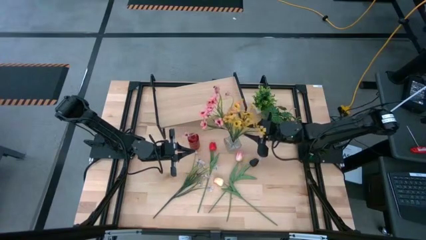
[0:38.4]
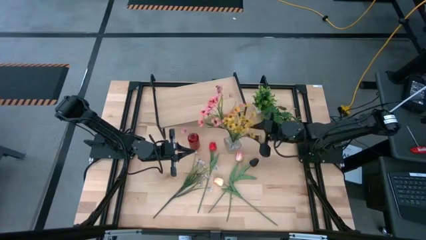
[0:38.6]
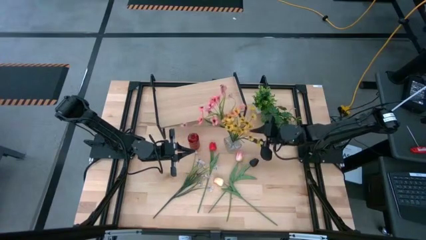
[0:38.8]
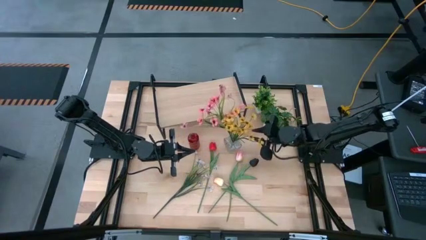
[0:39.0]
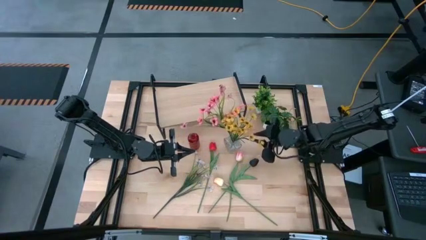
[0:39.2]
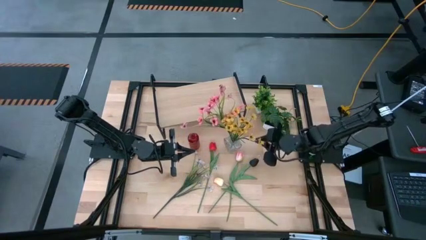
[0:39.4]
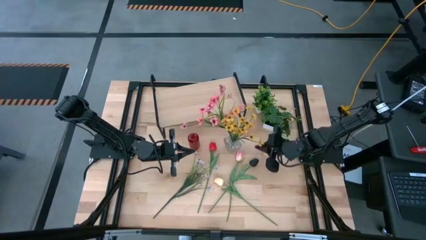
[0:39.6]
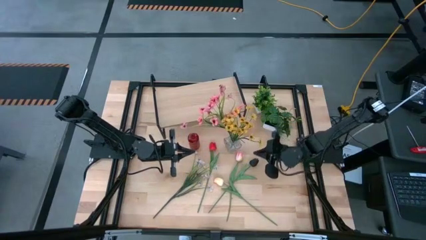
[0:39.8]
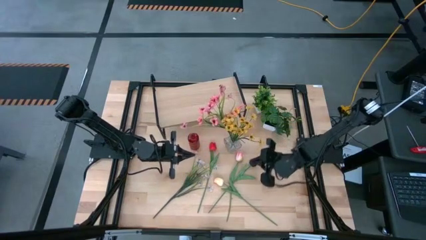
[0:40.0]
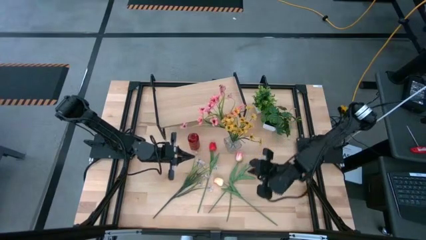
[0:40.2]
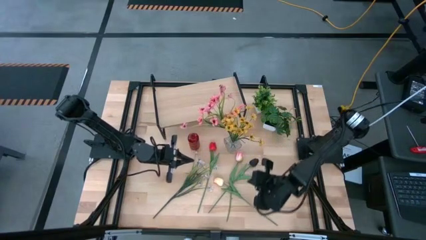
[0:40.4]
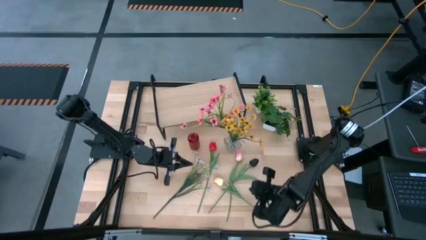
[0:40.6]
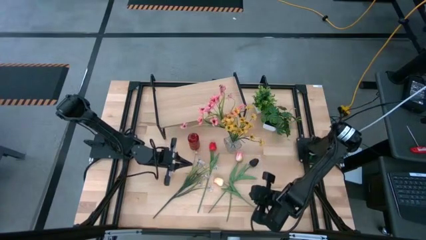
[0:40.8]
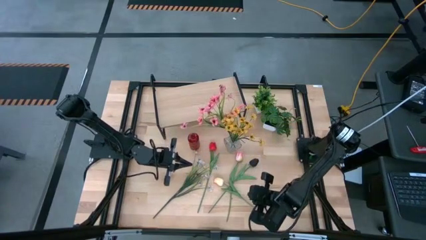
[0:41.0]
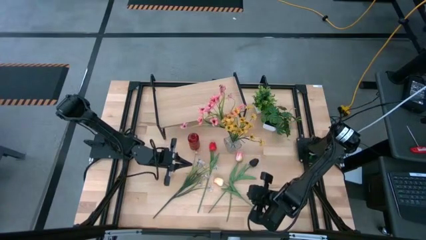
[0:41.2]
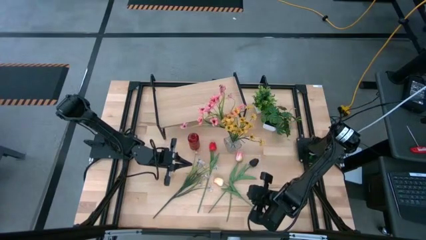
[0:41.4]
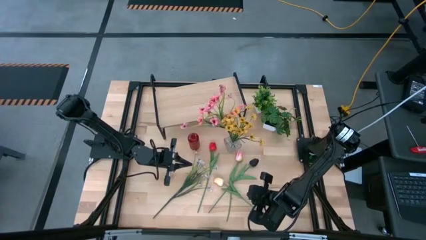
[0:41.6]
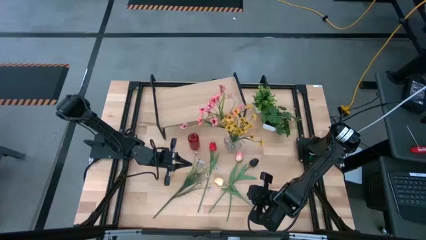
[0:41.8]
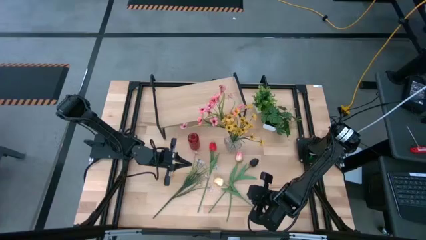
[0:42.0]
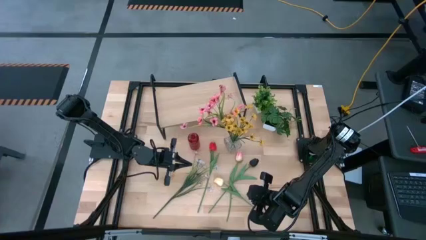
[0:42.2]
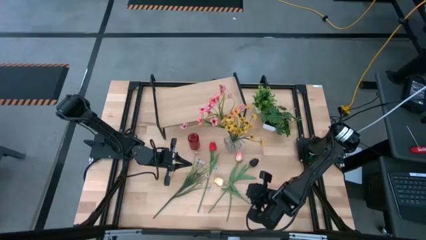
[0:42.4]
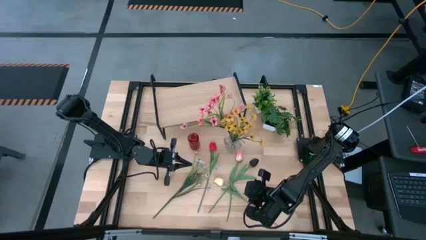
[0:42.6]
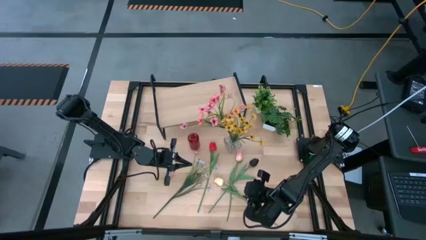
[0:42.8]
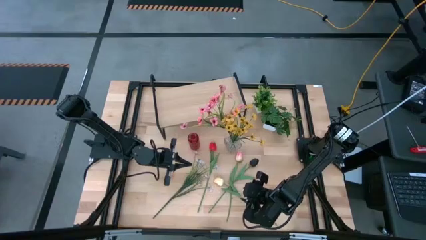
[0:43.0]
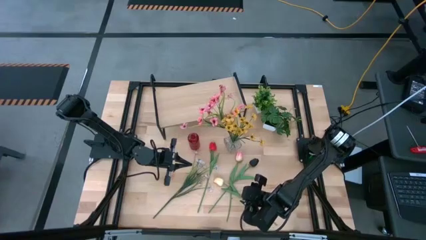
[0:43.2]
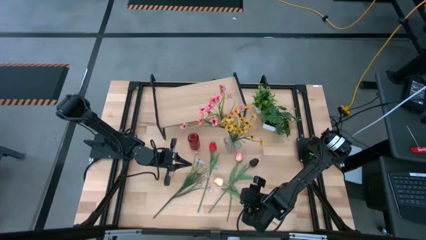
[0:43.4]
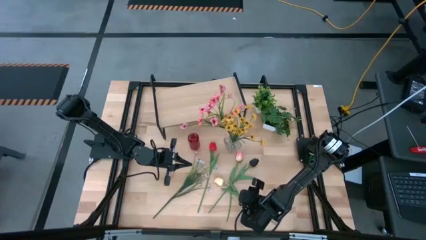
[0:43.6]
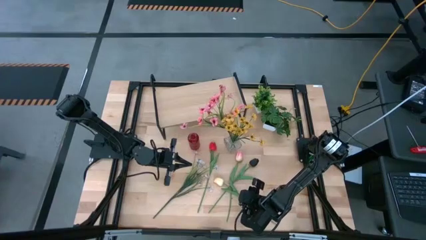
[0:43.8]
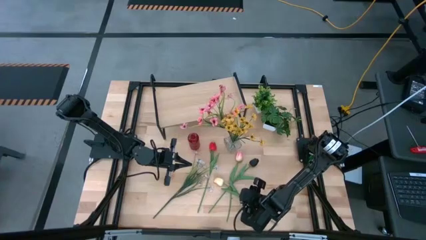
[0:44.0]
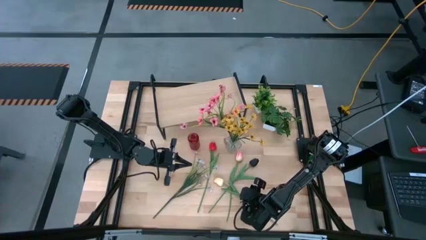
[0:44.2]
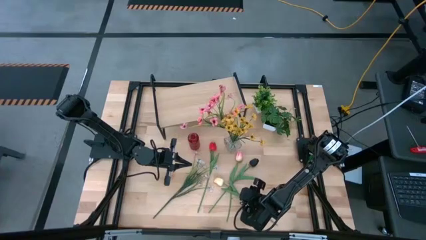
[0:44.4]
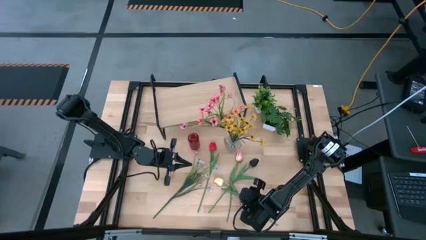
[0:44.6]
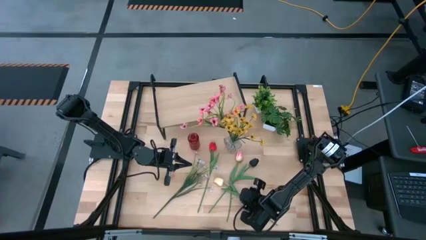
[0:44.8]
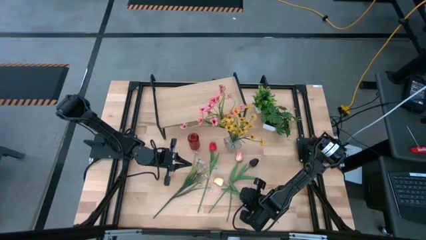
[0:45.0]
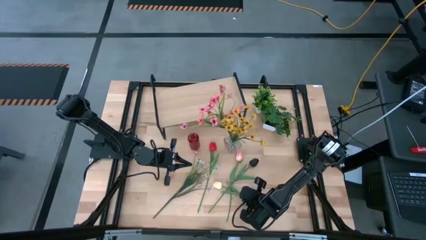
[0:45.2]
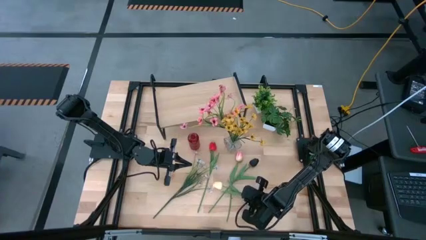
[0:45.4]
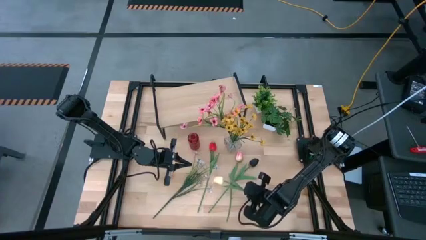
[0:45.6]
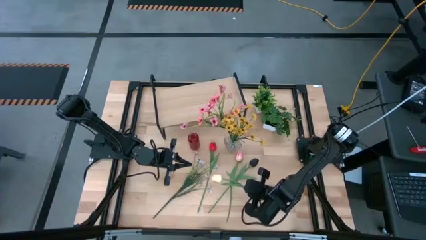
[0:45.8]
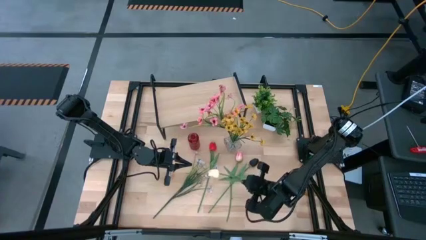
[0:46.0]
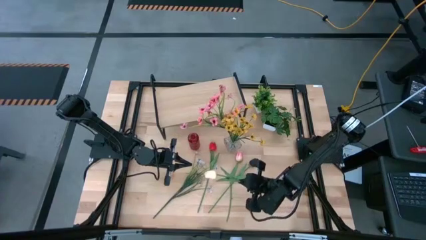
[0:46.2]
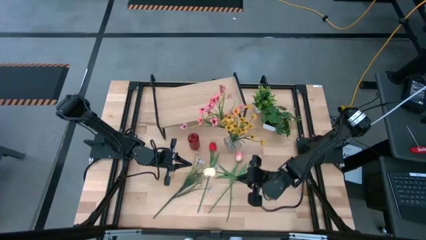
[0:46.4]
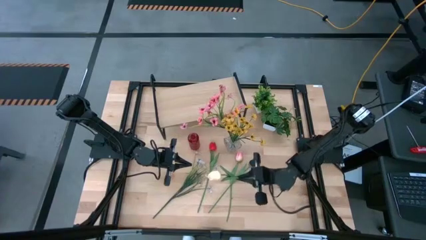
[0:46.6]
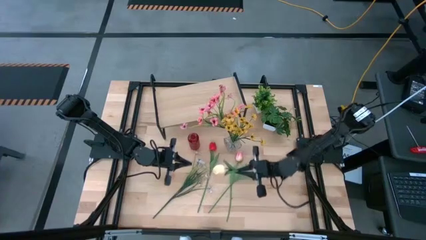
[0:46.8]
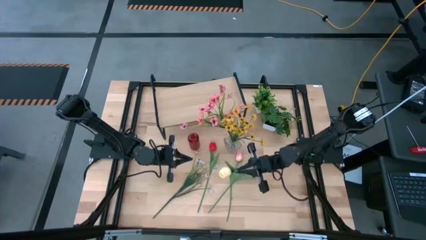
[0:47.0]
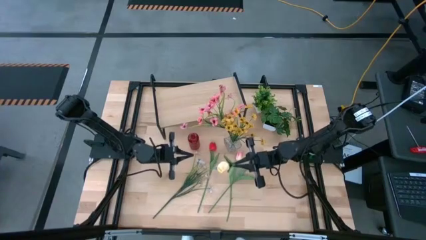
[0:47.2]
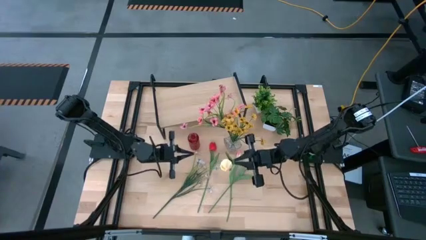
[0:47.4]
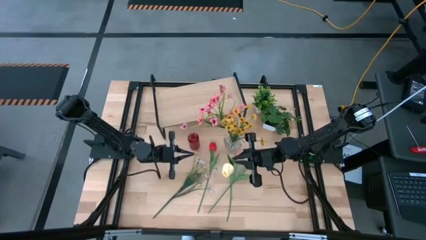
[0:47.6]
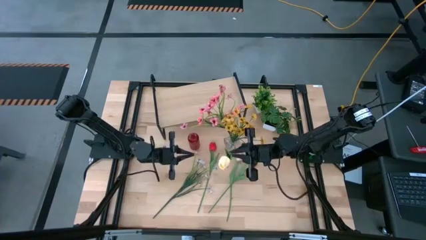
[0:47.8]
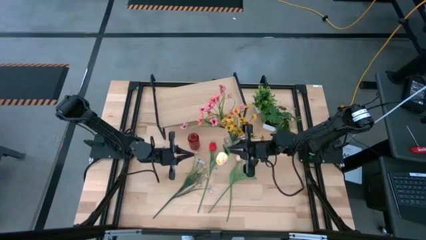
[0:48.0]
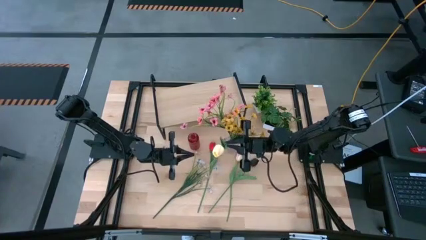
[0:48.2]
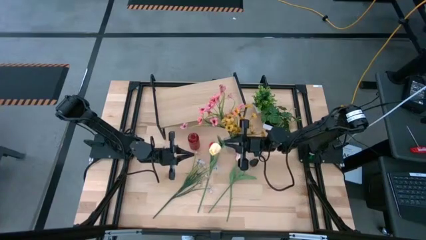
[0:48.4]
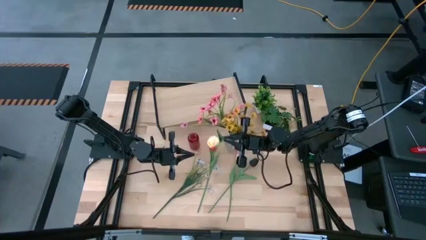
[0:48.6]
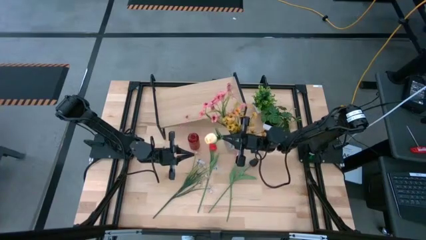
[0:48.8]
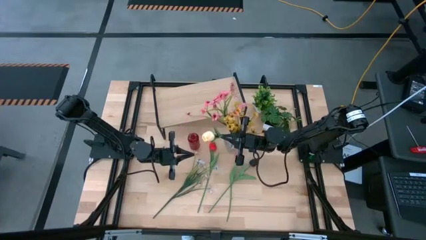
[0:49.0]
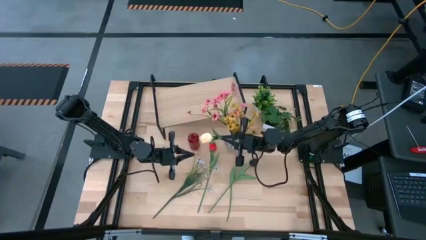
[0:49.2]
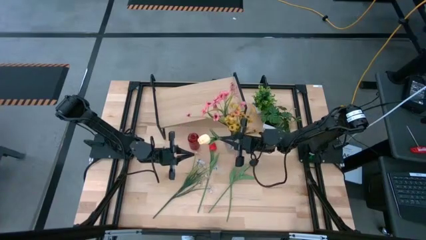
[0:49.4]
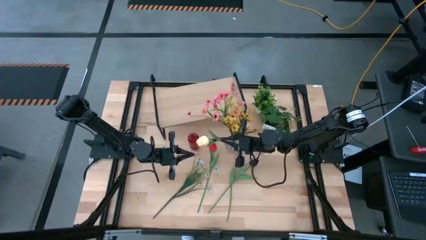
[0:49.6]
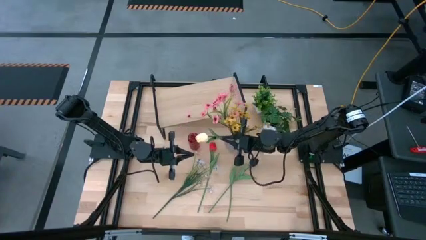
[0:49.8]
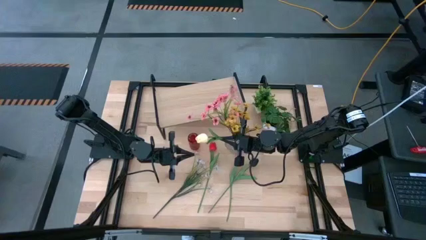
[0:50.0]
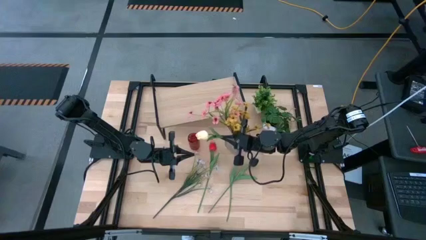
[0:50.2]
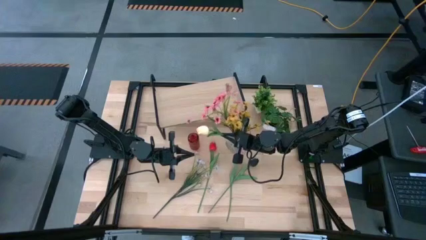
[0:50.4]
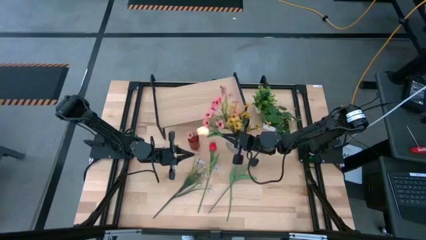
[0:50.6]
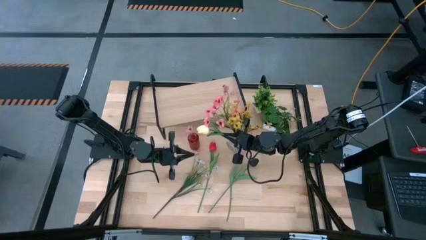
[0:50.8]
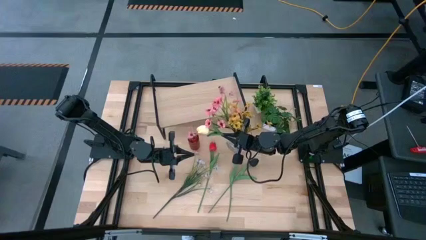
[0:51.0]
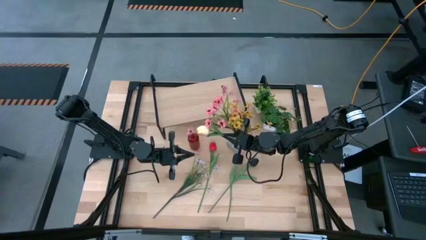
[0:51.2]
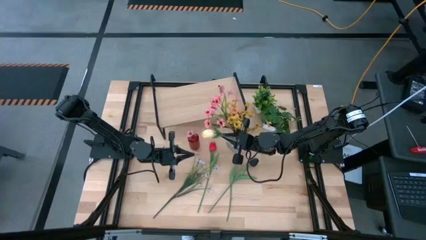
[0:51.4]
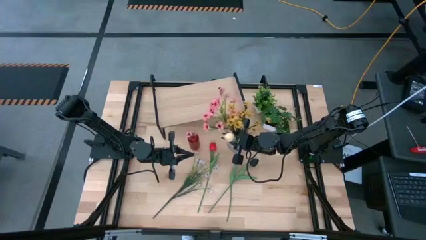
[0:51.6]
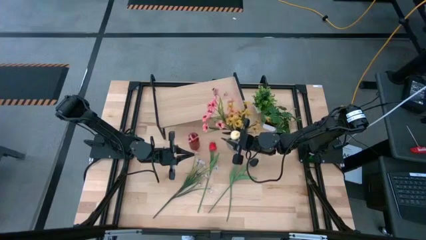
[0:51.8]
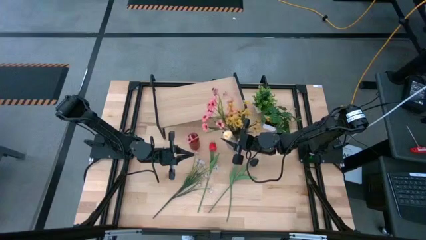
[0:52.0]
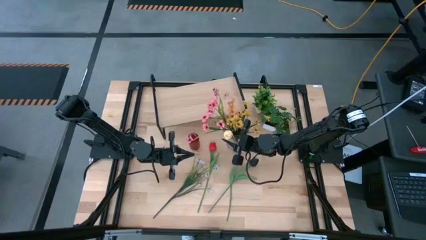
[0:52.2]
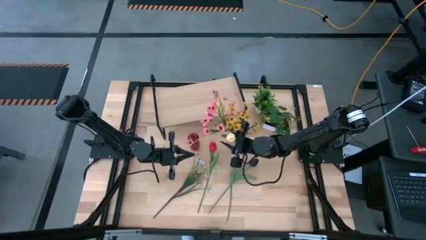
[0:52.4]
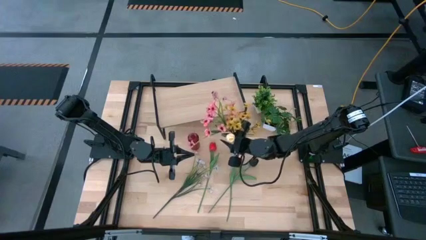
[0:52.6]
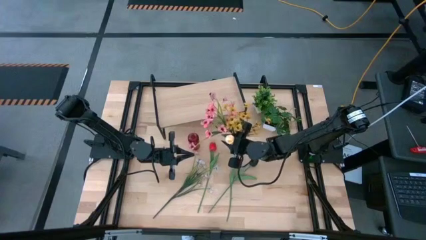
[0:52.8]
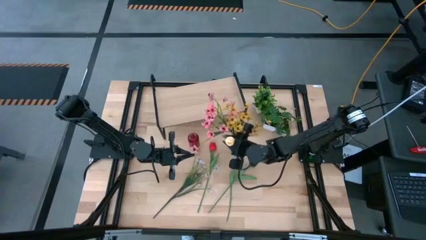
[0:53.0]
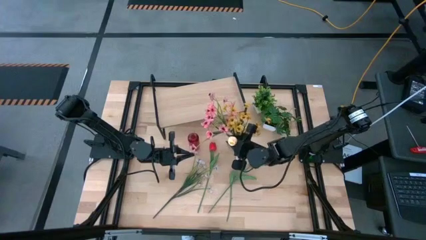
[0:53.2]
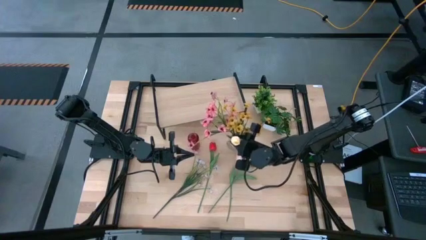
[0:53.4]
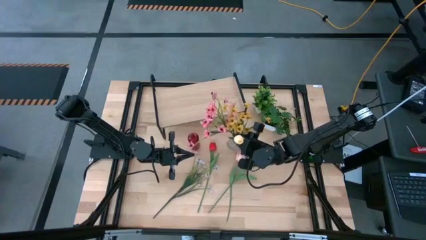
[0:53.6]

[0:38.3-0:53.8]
Task: Pick and place flowers into a vace then onto a shelf
Put the light yellow flower into the transparent flower vase
